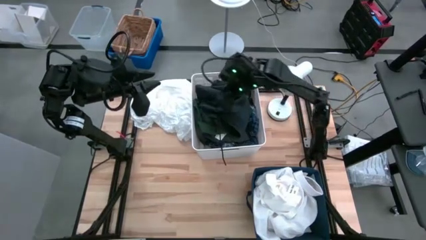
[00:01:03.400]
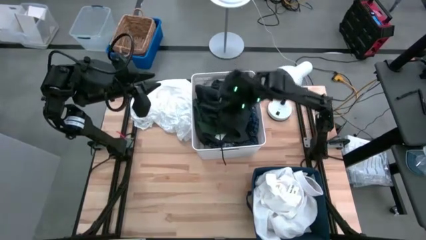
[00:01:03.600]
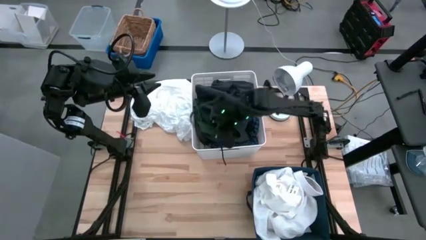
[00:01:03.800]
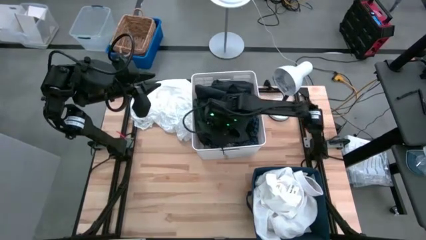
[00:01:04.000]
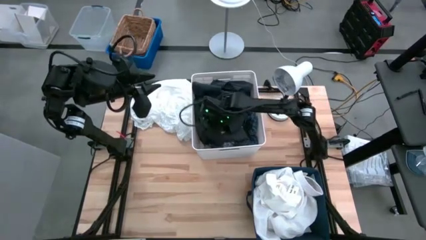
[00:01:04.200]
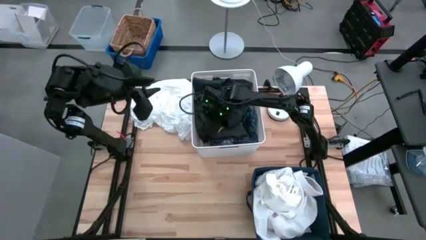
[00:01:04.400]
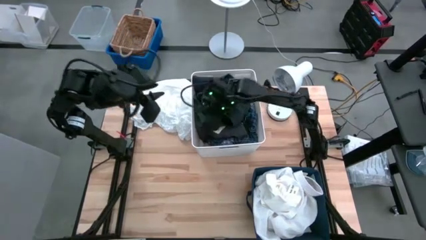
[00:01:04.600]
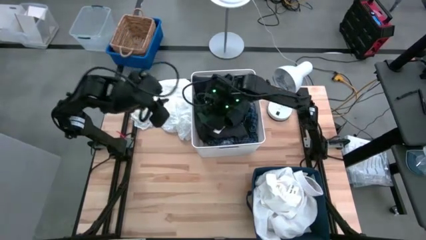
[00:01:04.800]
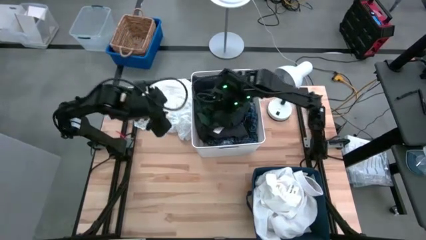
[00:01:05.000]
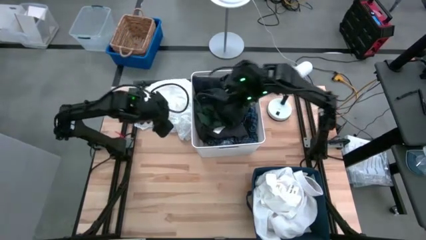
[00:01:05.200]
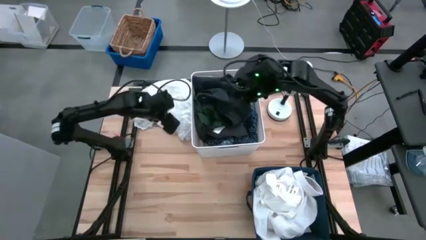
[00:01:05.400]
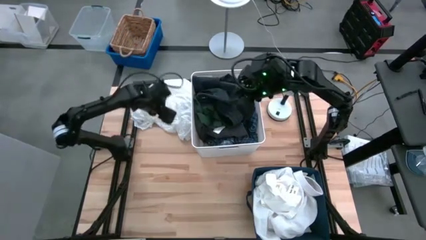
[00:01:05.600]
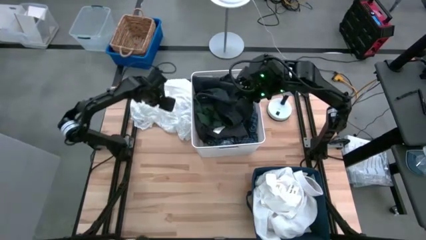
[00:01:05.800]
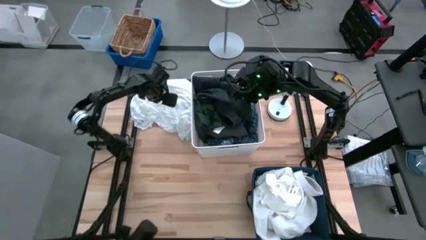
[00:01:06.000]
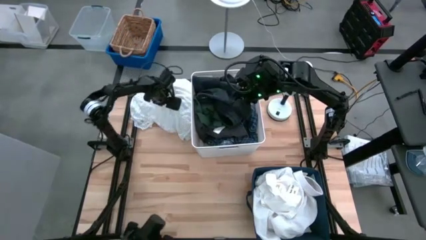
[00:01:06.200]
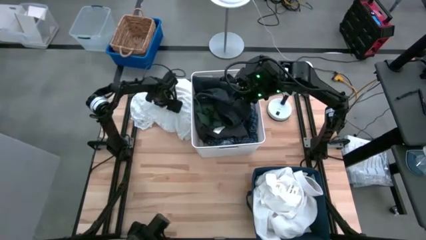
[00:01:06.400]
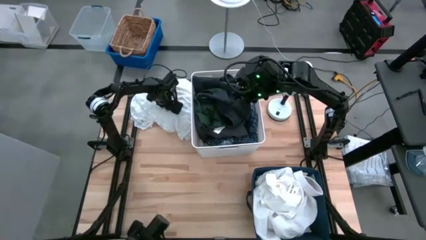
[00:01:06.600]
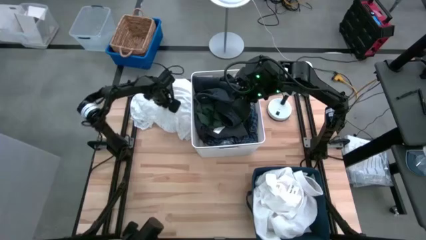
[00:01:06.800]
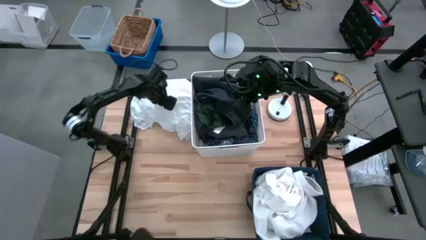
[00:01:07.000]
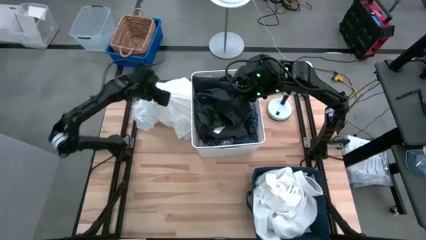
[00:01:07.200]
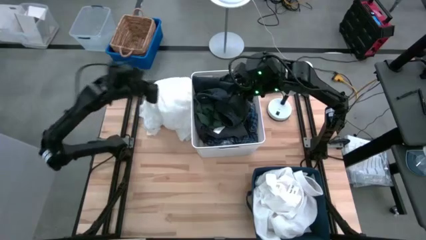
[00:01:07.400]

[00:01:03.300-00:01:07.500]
Task: Sort clothes
Put the white dress into the blue laundry bin

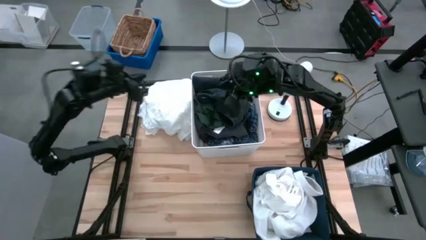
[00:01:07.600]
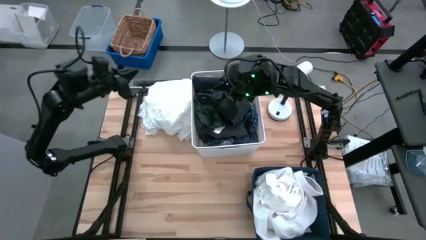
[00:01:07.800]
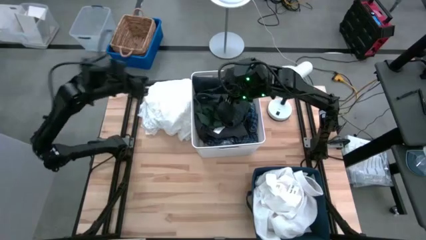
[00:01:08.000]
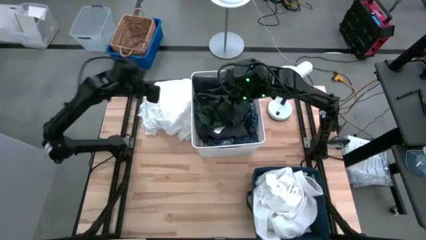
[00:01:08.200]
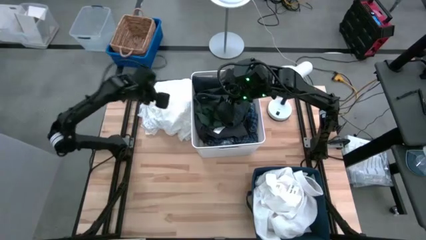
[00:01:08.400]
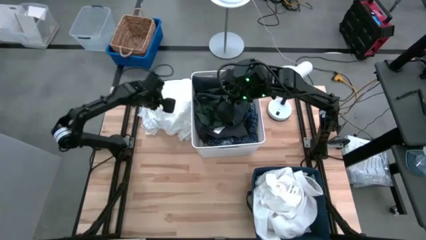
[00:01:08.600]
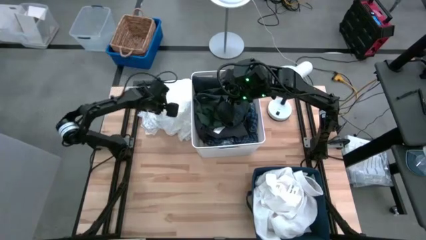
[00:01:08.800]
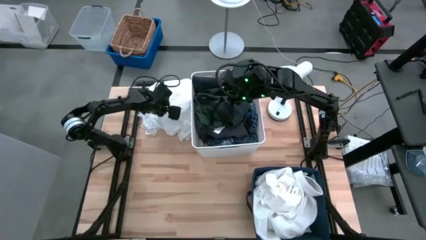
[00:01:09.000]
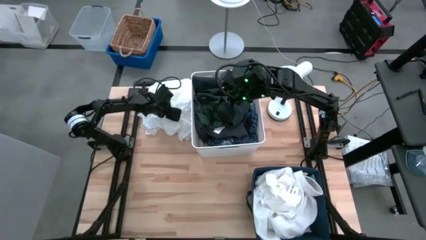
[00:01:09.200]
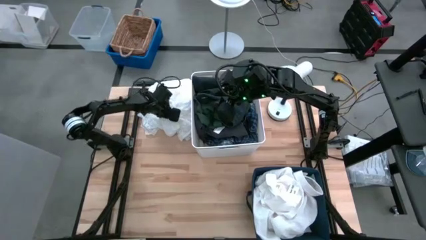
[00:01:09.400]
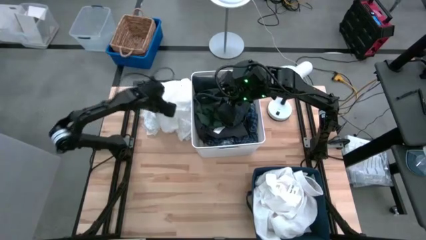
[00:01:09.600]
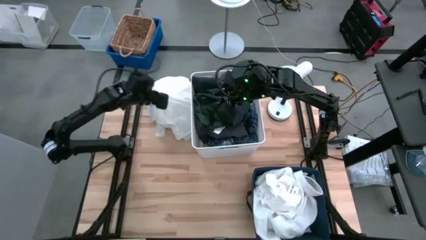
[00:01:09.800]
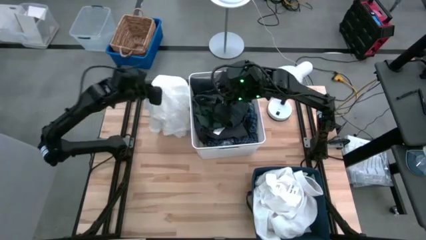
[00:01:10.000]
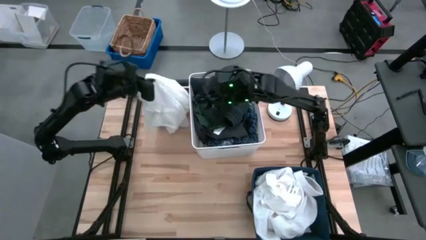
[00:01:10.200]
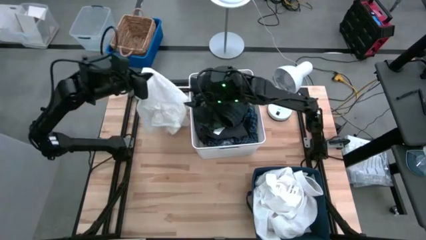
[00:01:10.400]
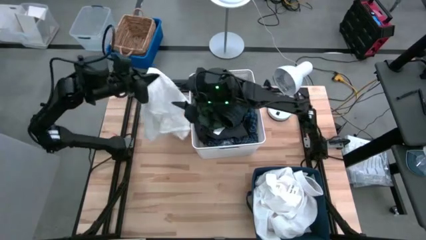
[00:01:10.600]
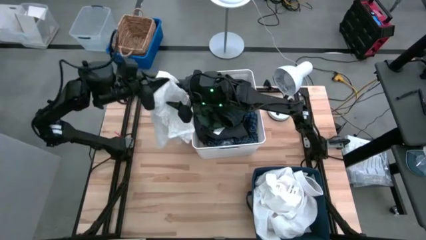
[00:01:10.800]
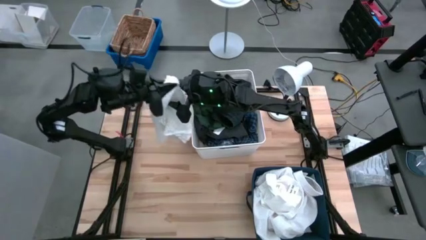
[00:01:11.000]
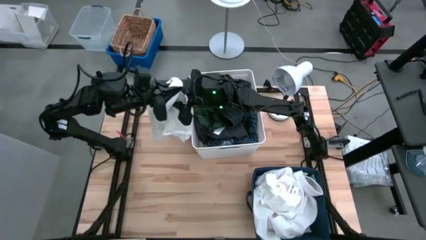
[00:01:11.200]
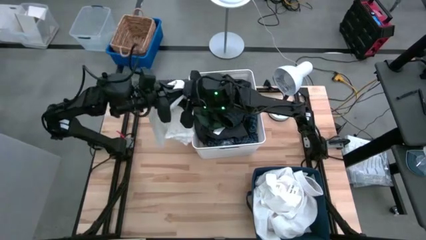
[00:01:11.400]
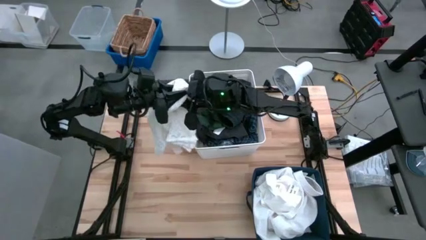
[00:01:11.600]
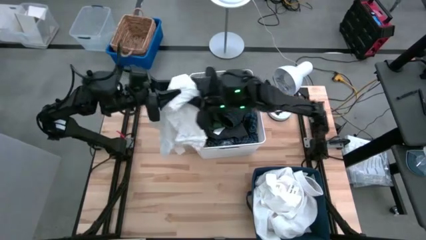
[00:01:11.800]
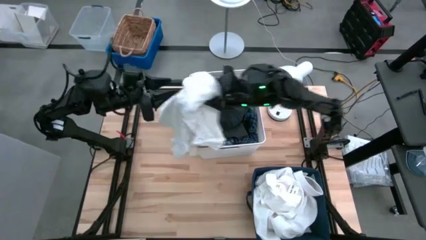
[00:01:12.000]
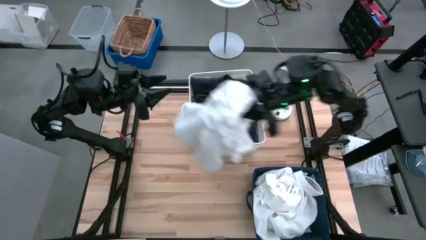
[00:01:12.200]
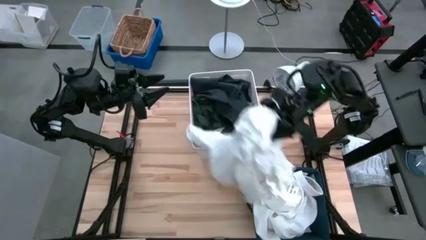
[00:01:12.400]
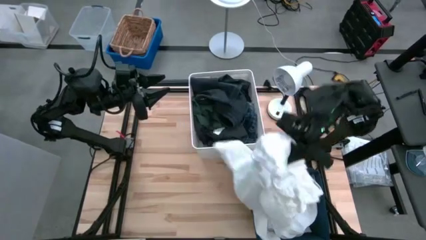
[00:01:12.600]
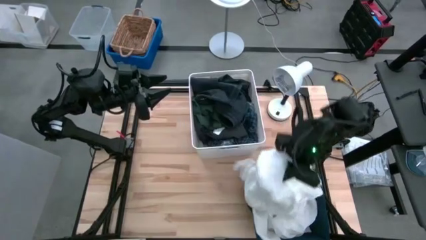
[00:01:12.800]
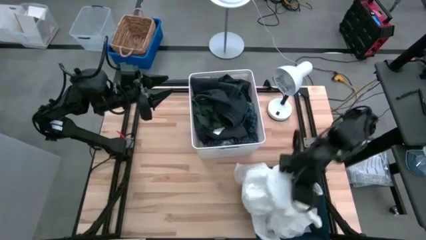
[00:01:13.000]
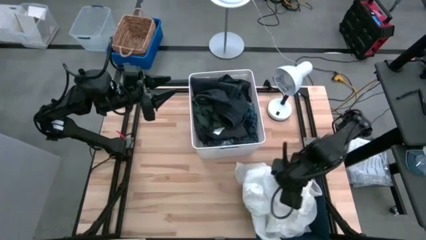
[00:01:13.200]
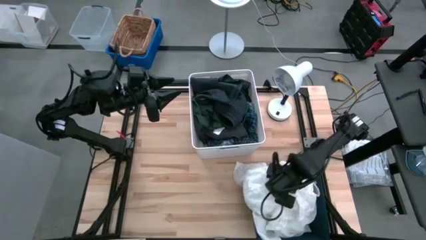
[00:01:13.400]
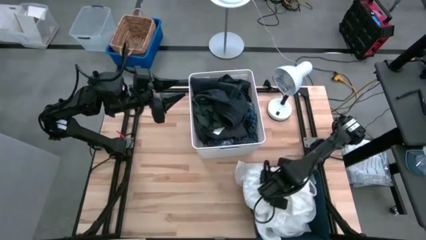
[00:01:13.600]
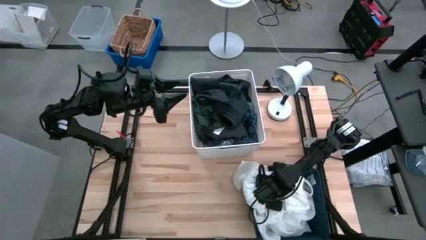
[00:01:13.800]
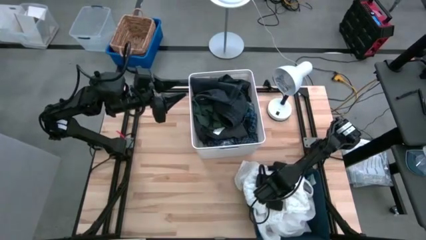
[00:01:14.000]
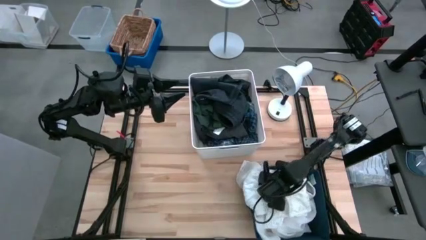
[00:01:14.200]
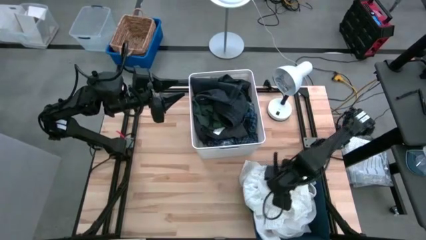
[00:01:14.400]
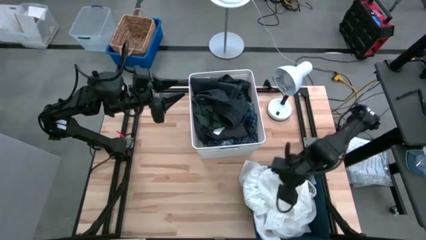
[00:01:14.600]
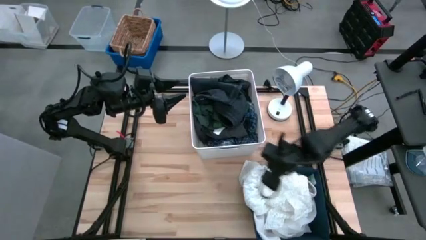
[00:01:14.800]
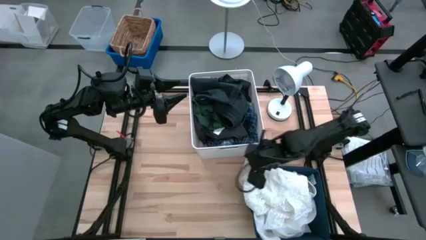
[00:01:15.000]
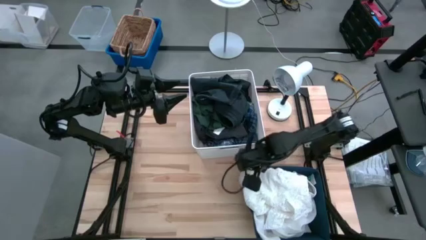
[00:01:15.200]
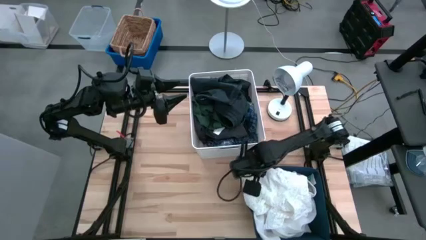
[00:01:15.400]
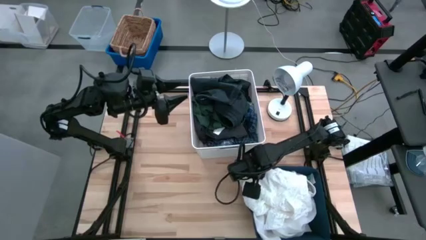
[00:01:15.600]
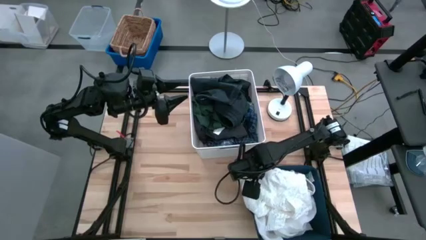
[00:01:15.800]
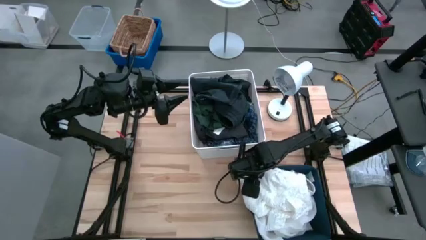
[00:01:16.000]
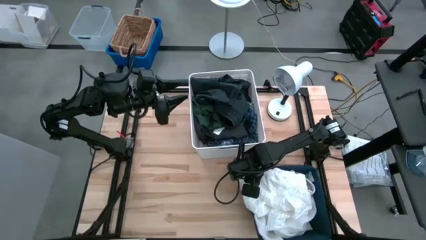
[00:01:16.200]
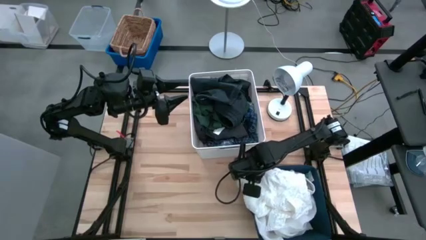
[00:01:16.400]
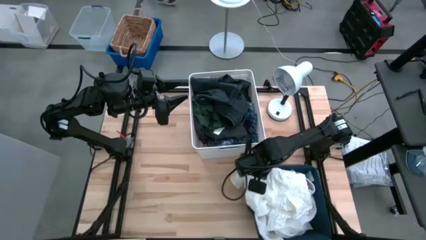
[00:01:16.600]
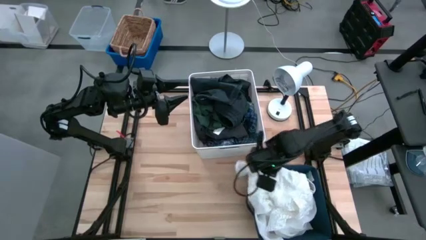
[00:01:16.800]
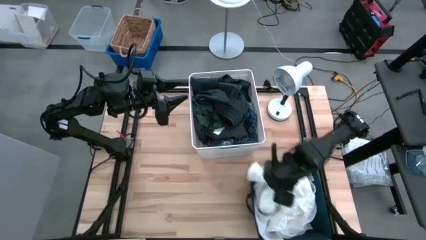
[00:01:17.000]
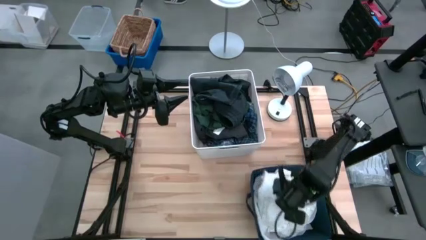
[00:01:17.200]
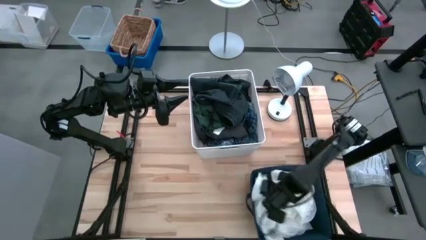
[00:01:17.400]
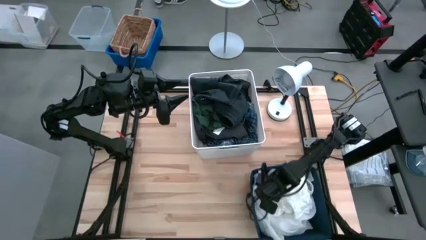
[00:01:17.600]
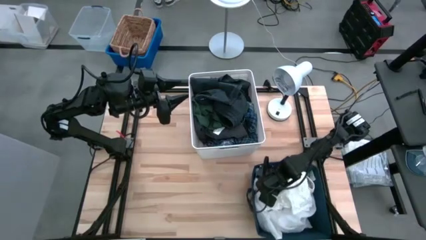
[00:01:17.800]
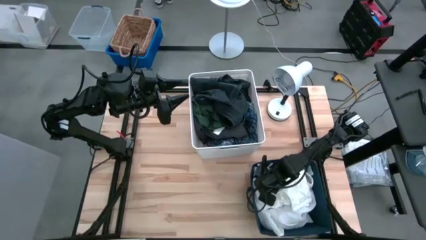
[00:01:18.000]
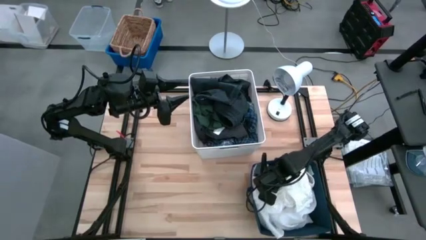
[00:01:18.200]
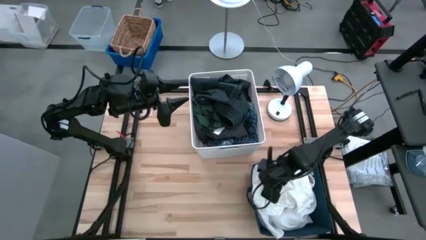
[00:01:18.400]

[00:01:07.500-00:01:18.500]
Put the white dress into the blue laundry bin
